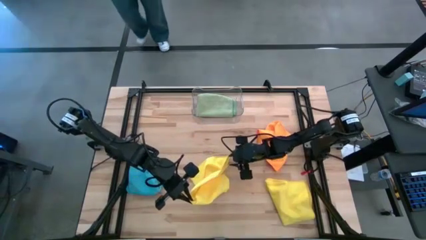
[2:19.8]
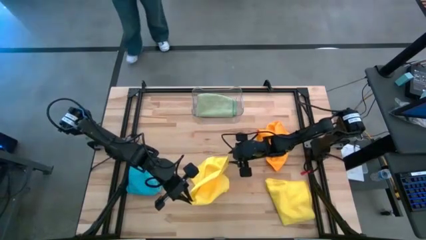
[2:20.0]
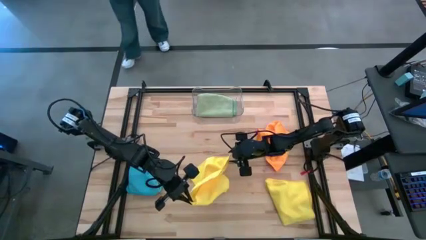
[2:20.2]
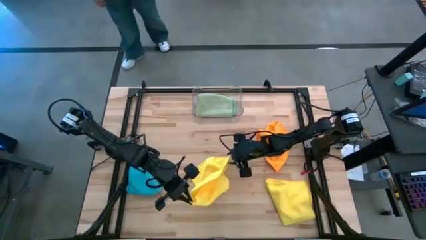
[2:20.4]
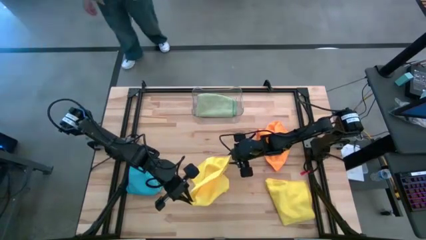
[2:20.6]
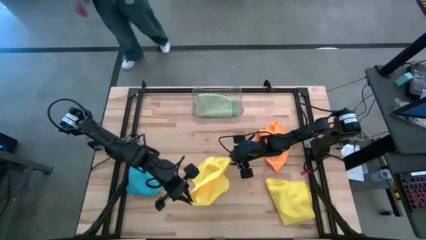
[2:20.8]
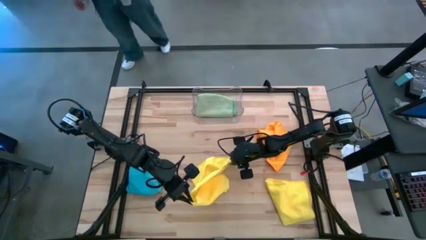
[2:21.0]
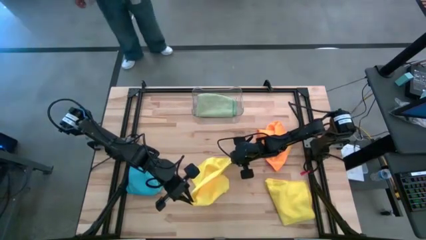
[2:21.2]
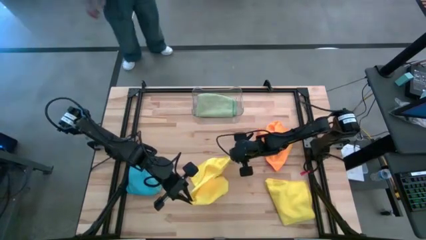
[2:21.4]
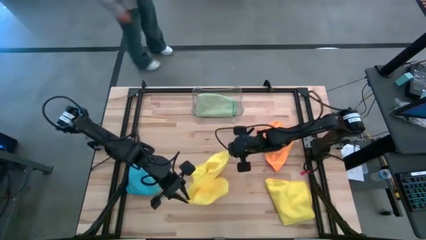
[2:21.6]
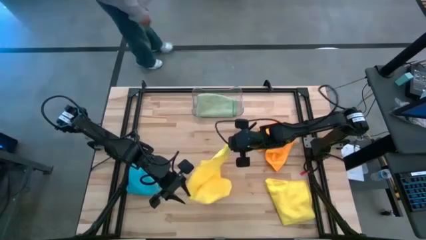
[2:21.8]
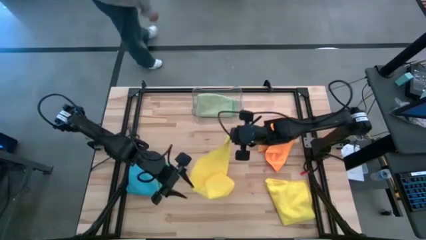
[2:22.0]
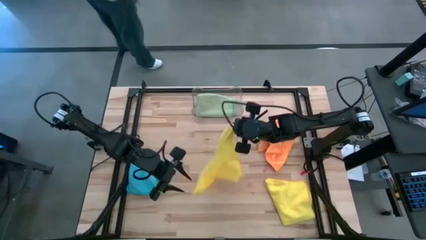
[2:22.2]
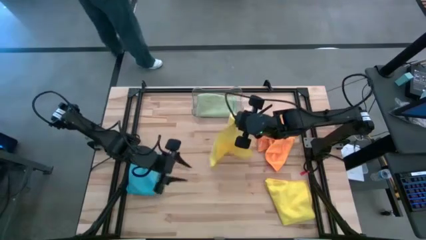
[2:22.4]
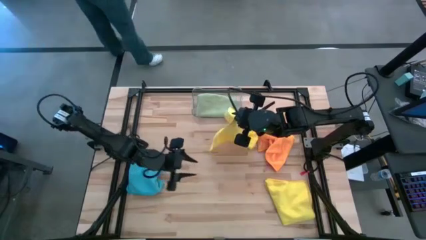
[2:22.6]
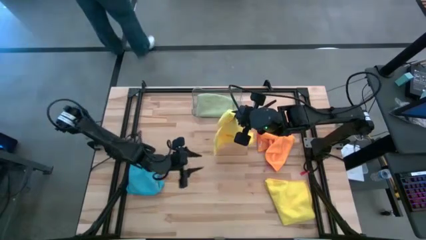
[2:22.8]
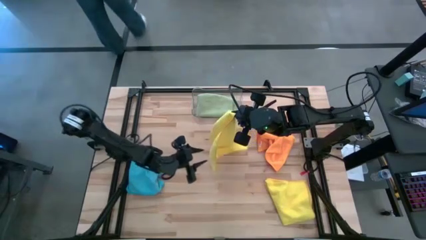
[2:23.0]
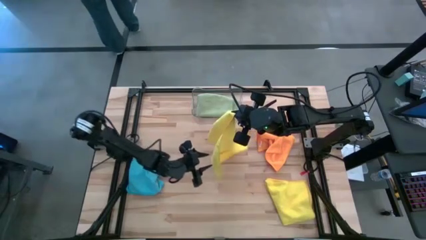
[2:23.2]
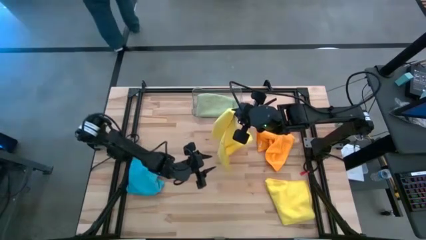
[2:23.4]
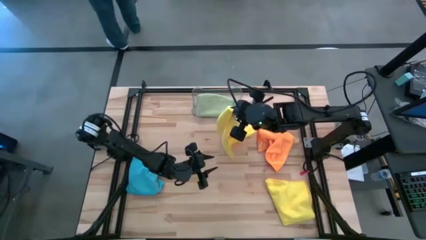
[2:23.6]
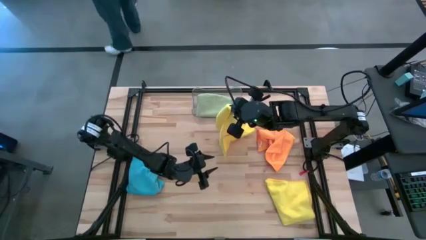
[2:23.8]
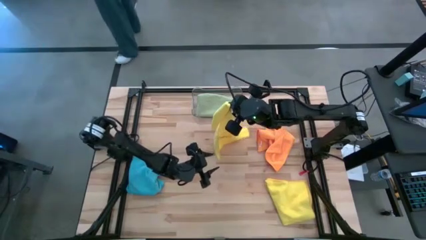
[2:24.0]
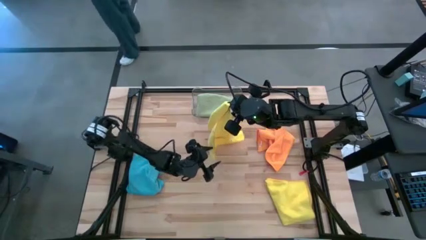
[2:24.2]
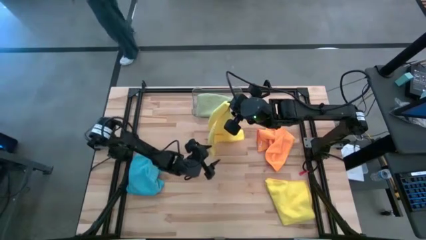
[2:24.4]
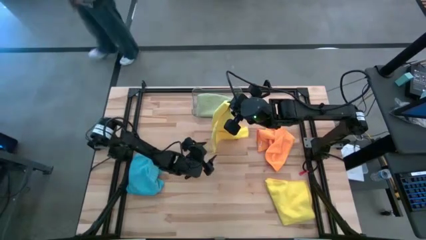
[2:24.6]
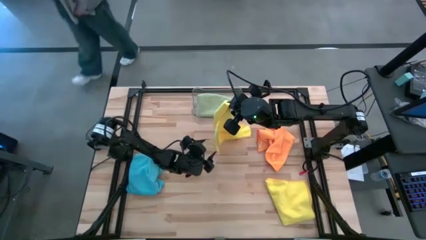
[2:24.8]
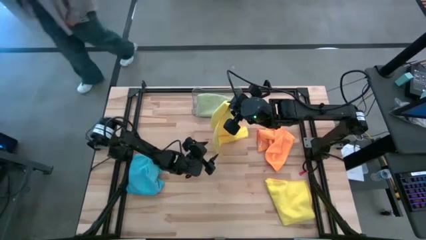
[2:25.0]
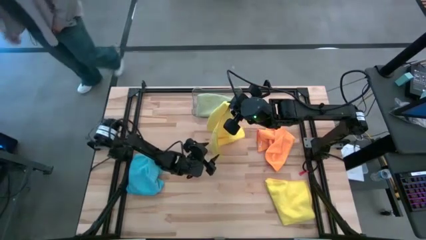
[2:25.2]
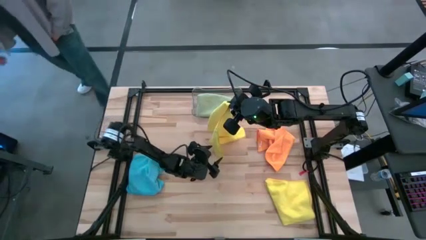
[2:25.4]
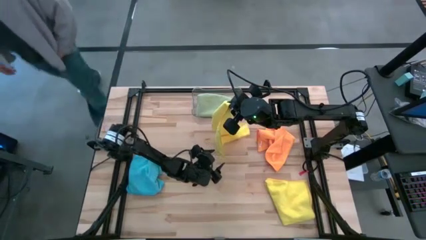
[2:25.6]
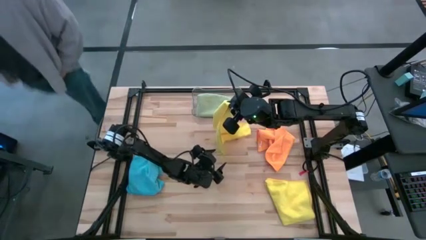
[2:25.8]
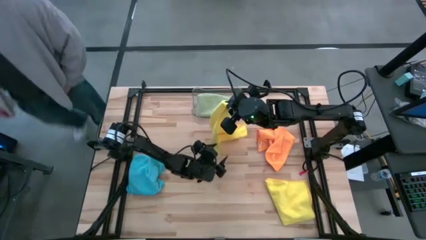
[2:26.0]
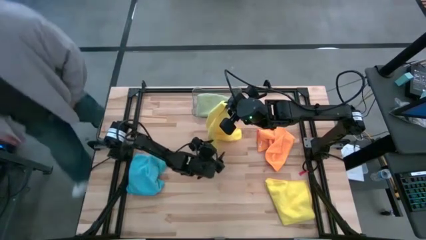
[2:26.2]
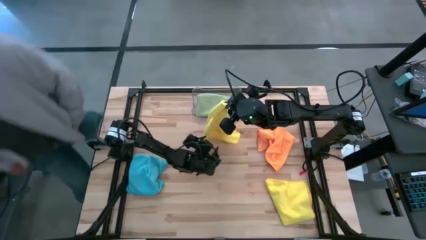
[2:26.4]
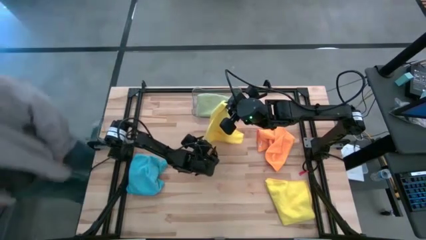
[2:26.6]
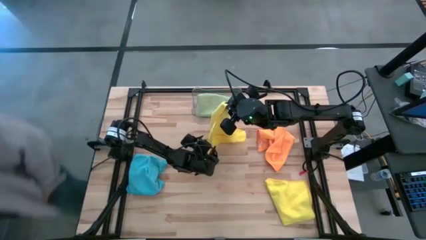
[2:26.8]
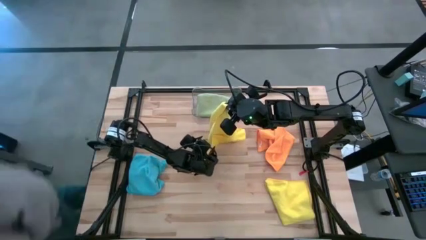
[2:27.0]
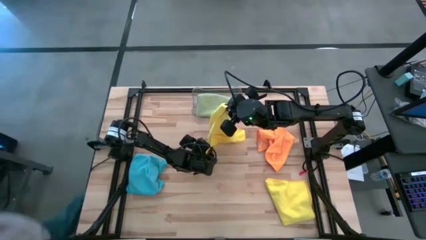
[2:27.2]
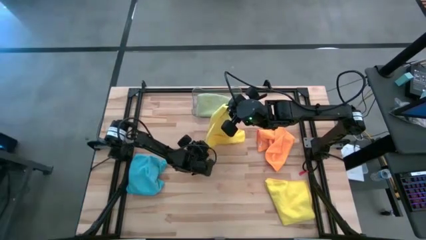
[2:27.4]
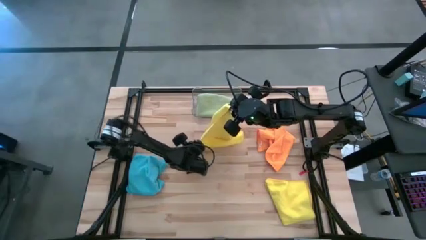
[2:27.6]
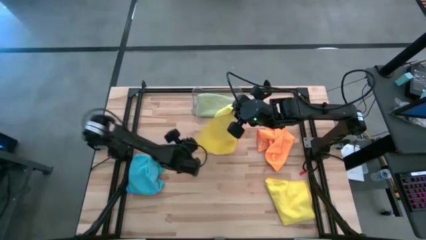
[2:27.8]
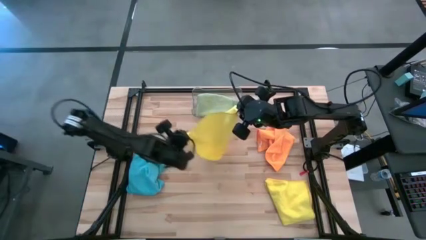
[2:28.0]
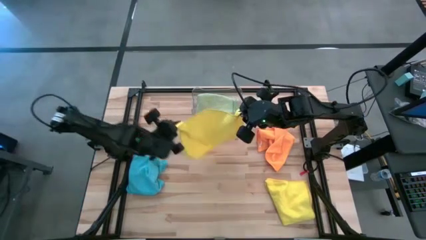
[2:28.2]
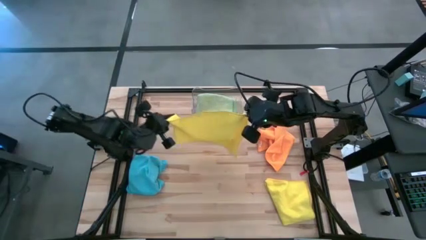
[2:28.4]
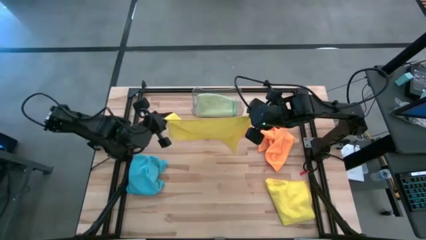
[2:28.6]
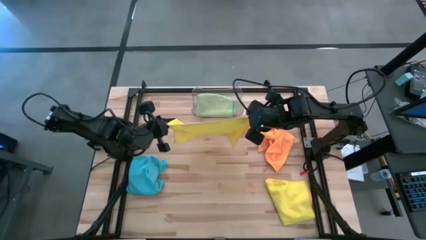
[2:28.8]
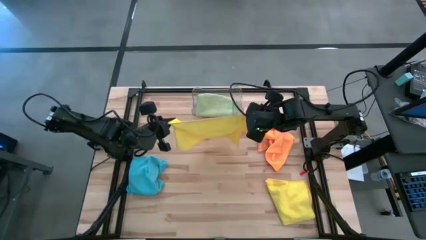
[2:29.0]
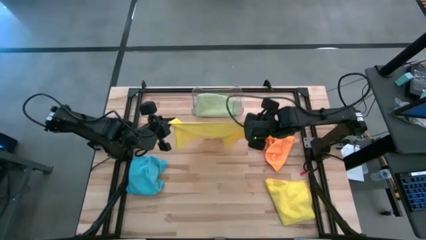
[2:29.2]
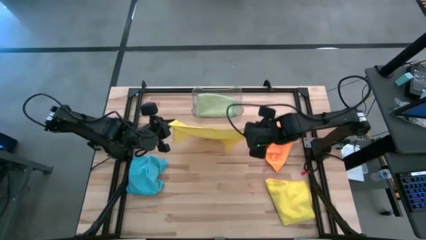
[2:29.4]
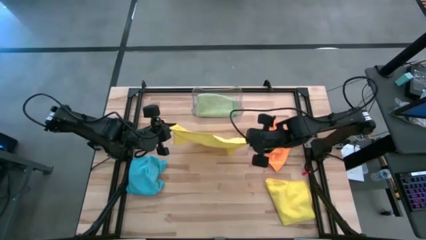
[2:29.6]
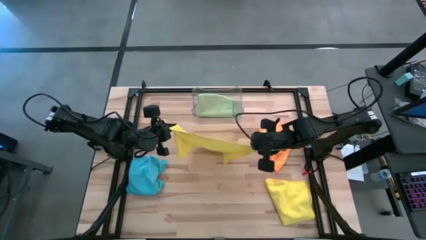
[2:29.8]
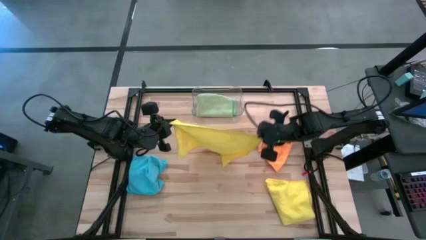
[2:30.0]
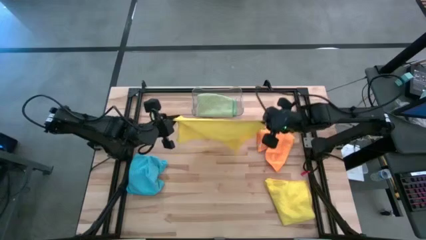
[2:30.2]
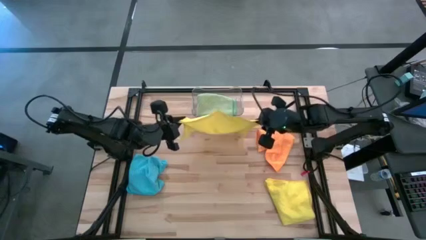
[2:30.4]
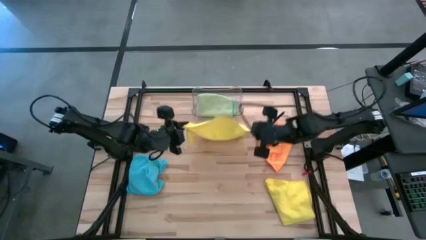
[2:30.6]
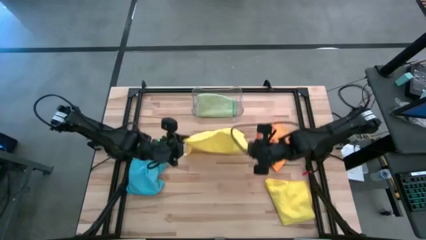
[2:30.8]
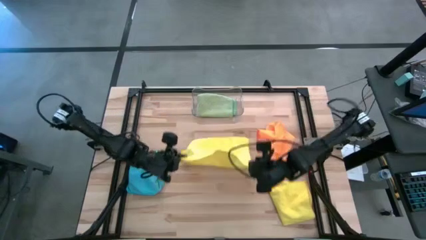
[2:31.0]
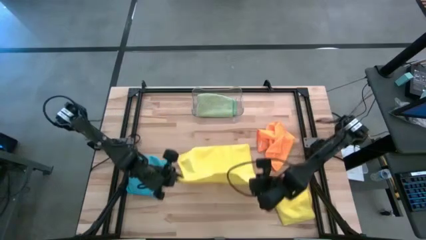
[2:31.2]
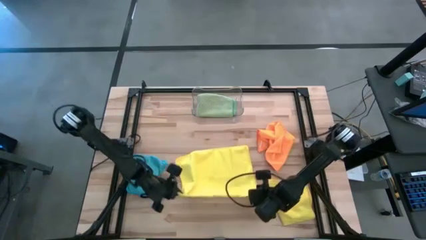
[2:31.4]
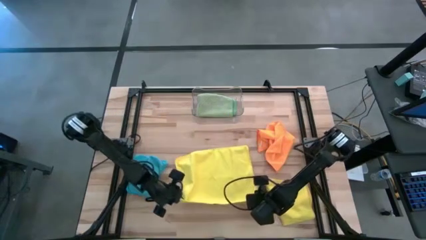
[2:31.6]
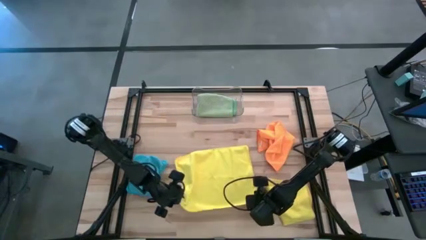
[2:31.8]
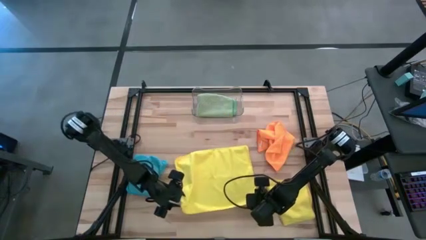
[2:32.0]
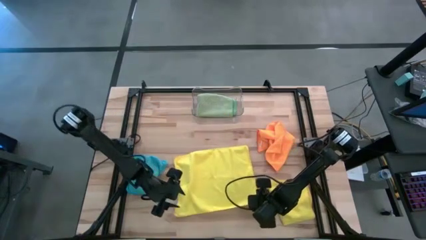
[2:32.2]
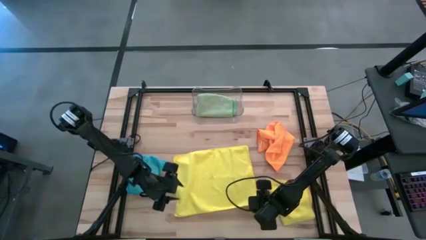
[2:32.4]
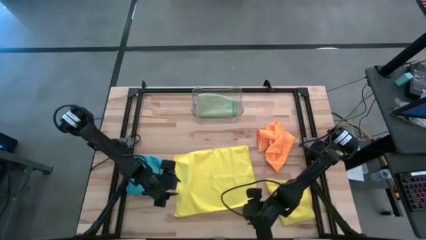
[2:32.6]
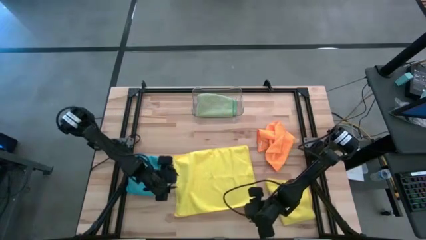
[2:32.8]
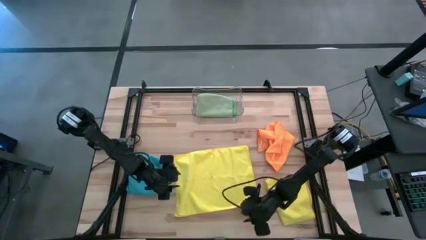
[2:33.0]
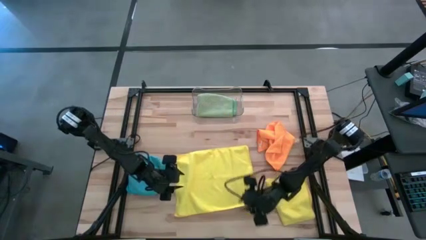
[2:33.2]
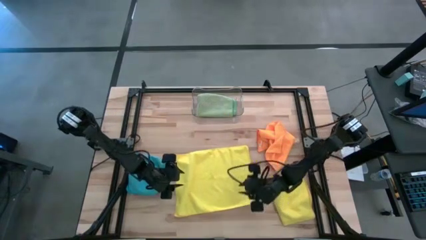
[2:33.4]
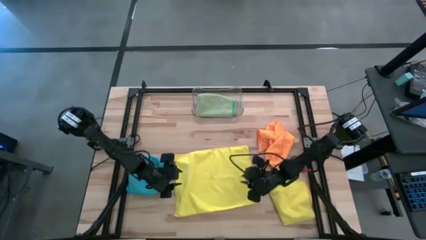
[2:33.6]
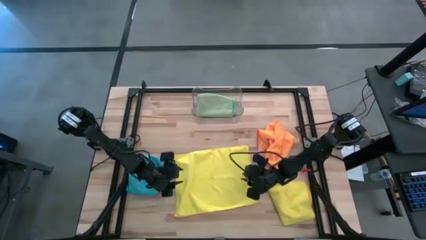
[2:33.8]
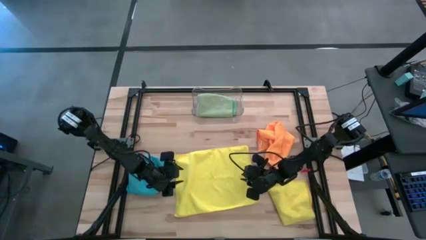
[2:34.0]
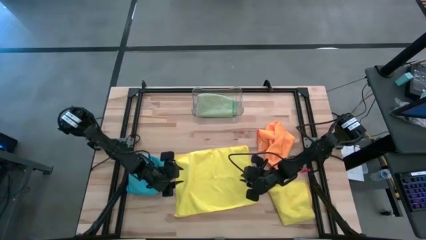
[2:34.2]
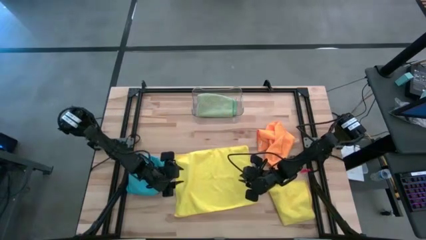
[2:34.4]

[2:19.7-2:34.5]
Task: Fold microfiber towels
Fold the top yellow microfiber cloth
